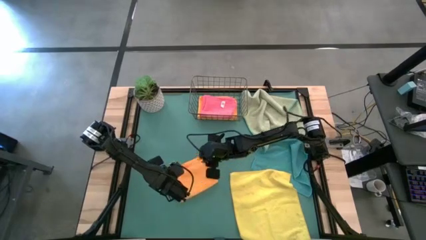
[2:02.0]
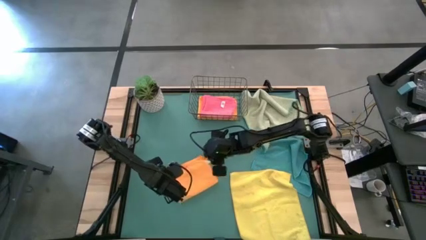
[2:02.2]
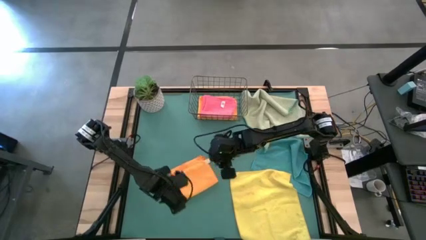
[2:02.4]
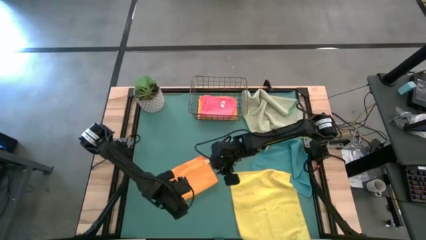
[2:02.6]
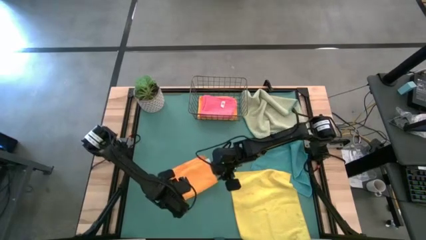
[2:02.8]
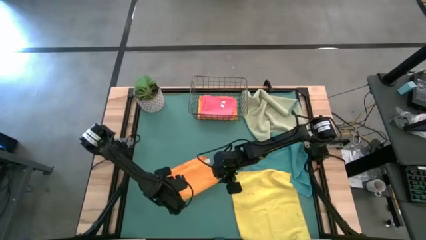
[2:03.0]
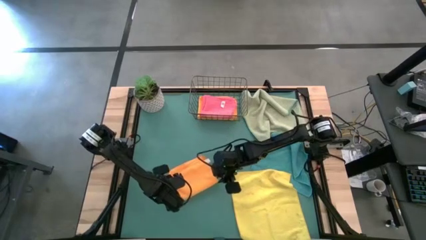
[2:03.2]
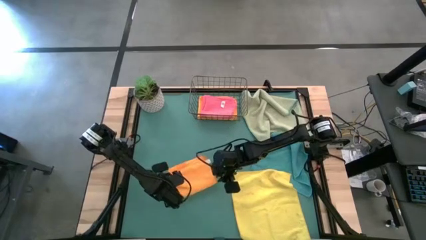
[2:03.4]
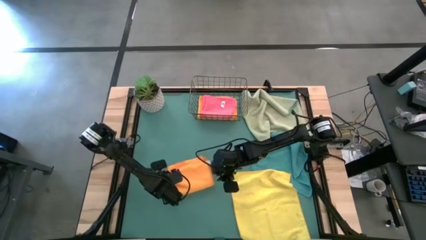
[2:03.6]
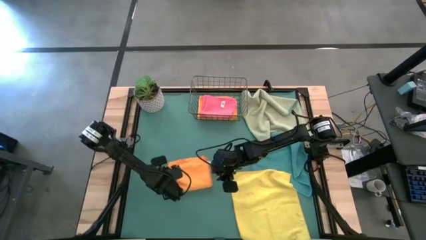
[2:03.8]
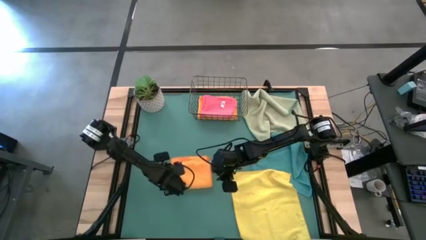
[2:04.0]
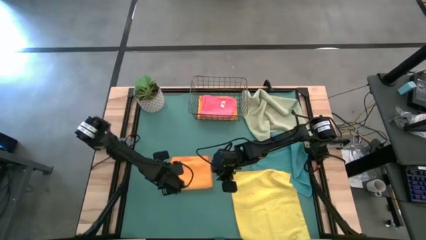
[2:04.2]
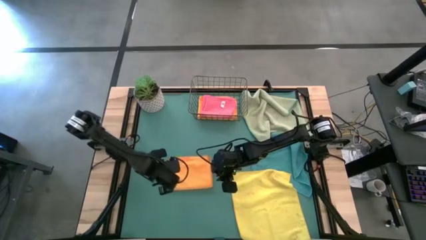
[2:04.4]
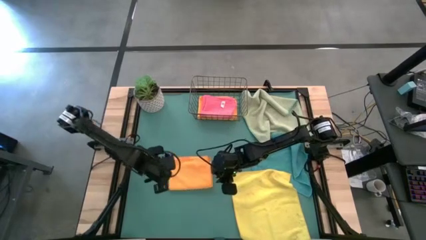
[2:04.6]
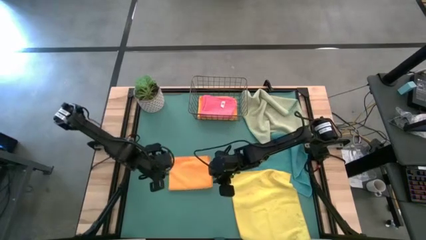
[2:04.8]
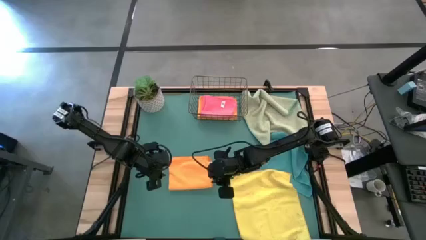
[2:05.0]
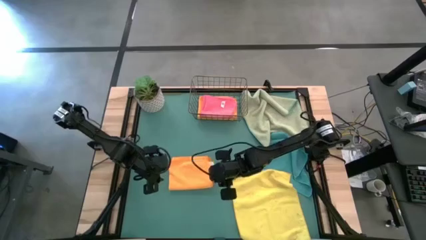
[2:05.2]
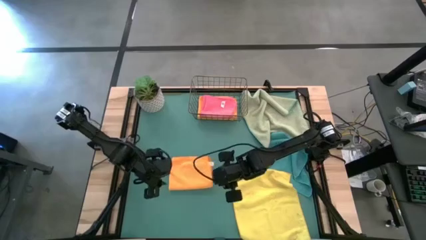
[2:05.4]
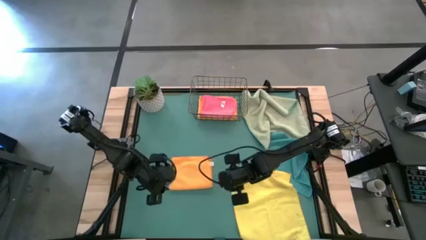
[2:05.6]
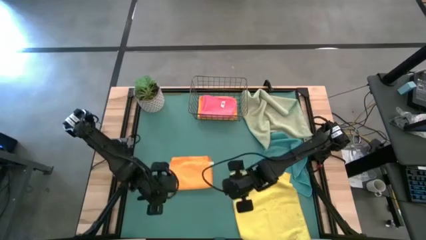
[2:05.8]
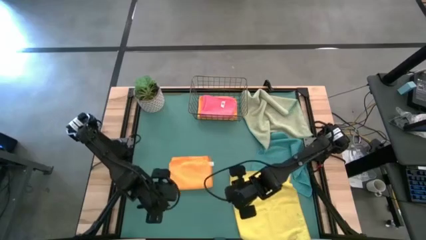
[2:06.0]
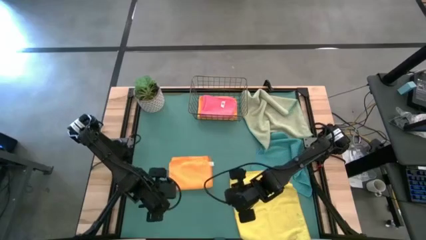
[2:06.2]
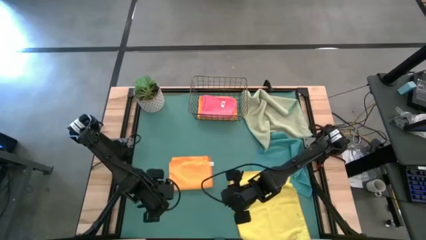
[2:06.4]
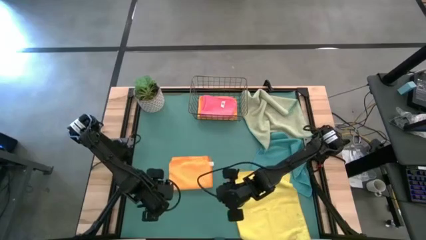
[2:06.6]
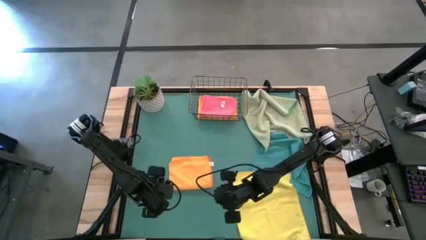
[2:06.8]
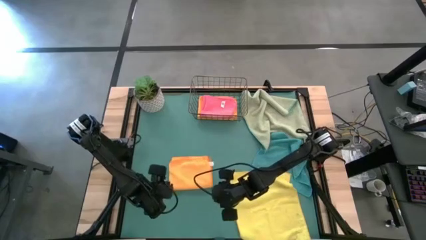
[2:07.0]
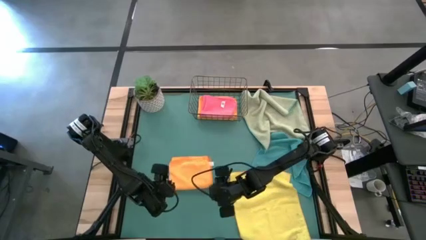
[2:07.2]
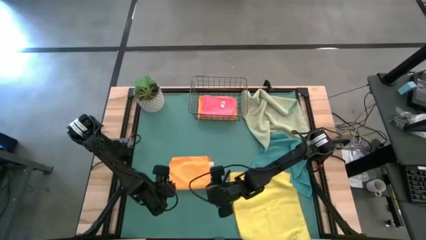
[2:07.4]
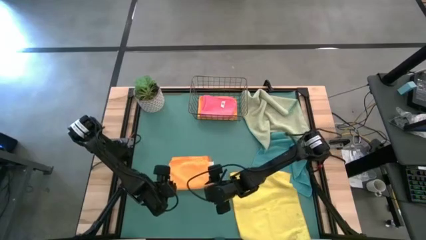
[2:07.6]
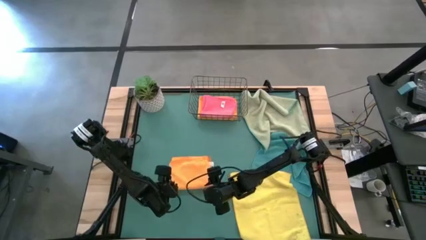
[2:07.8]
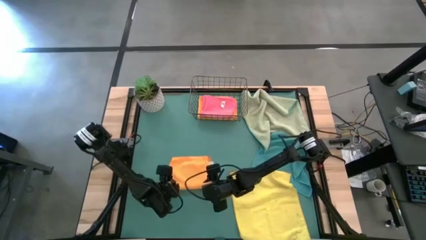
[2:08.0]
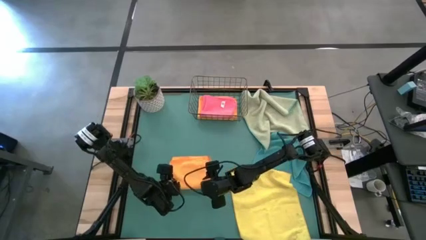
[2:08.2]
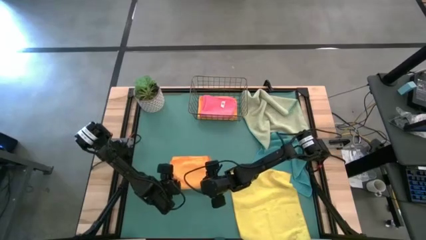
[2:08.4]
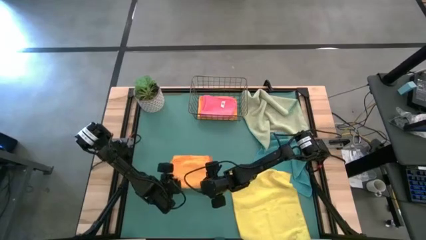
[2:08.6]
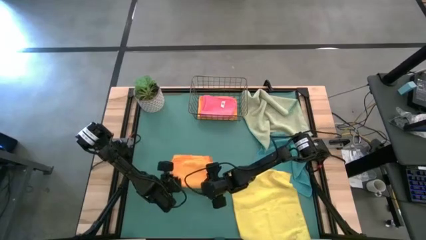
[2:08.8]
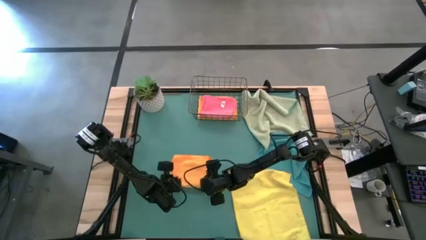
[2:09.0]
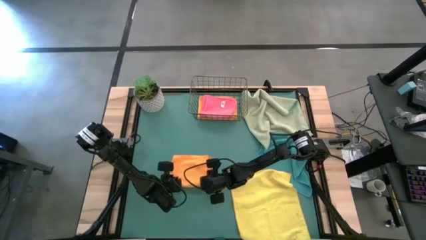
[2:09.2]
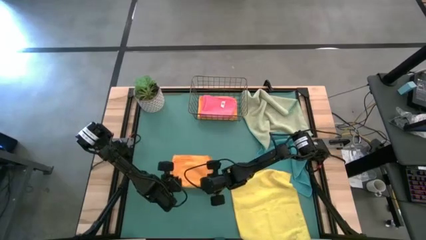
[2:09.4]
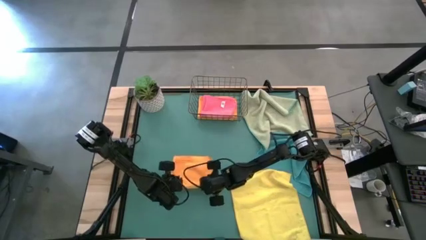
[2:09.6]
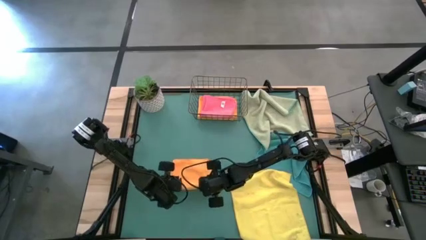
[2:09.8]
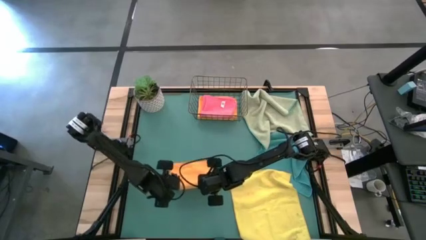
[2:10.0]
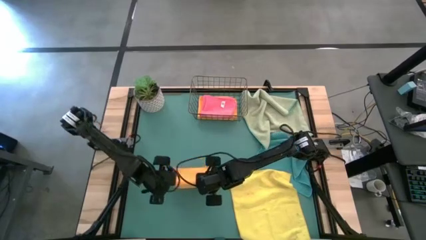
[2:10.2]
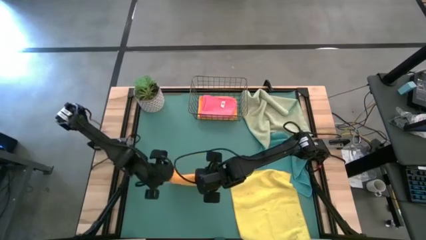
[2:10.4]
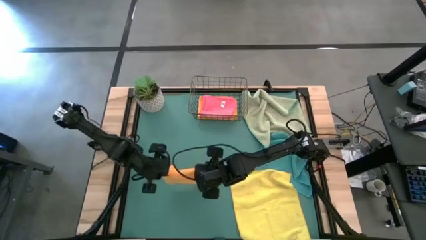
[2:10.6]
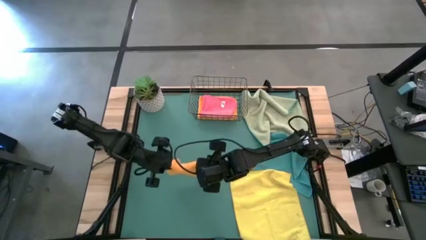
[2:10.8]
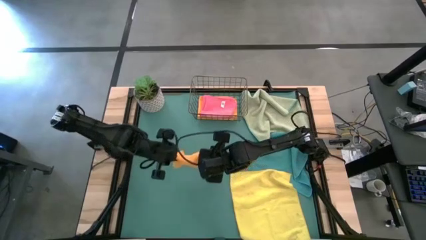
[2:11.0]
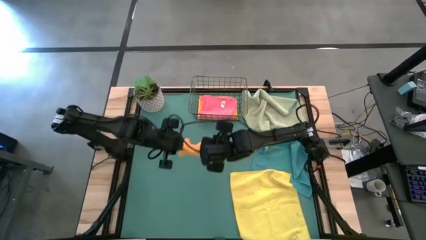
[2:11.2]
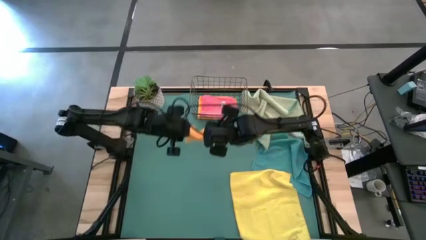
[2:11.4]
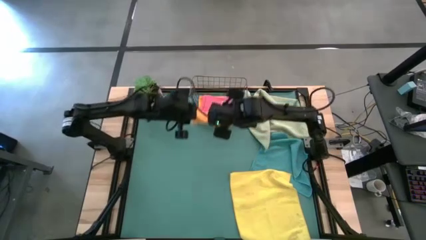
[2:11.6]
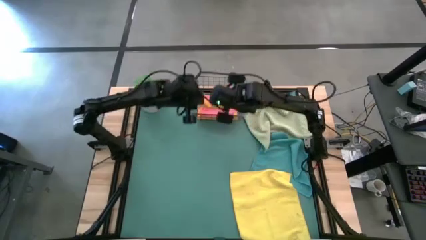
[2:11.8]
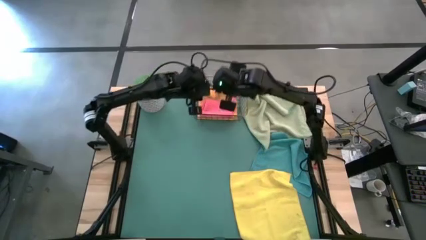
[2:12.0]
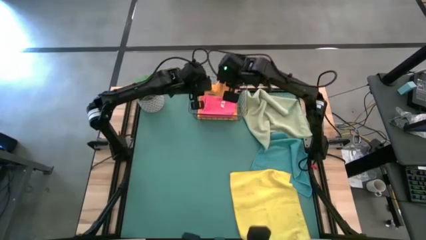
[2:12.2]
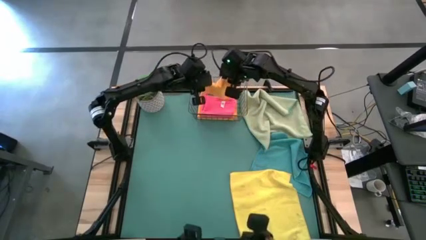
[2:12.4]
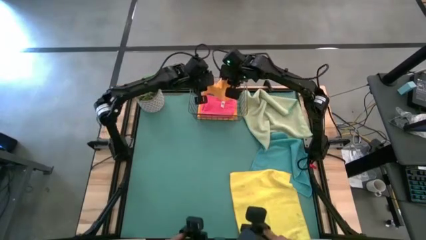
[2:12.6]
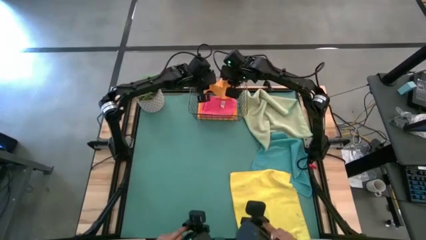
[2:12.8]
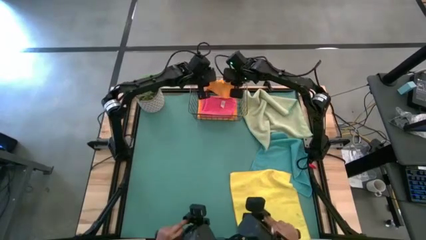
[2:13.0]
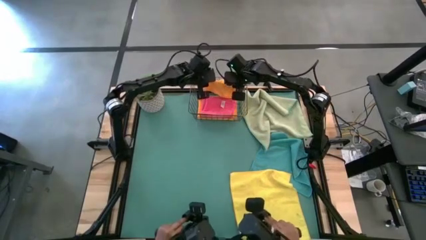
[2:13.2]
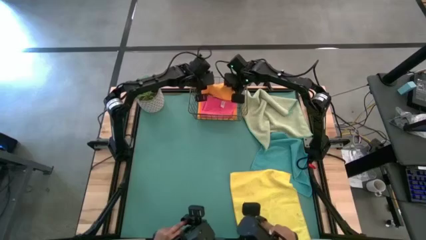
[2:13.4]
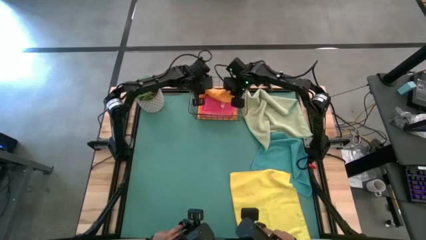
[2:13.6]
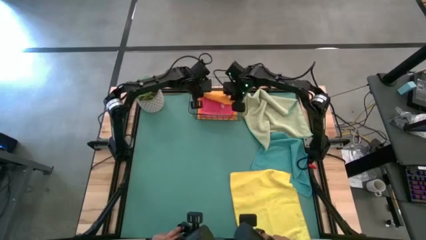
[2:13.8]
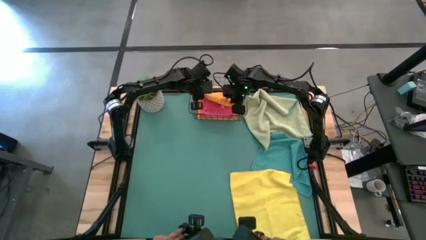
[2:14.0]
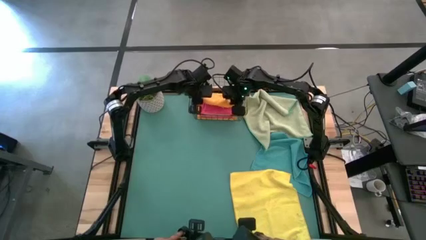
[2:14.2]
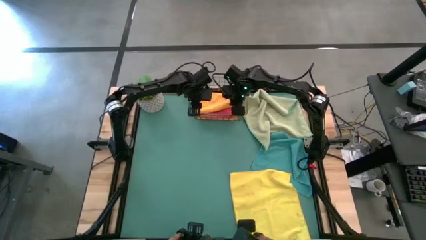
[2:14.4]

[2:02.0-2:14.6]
Task: Fold microfiber towels
Put the folded orange microfiber towel into the wire basket

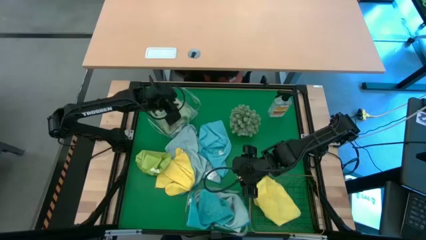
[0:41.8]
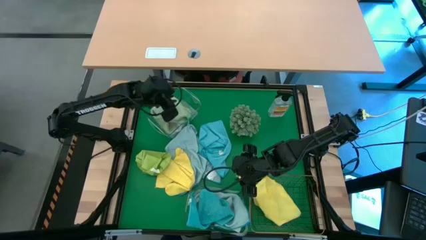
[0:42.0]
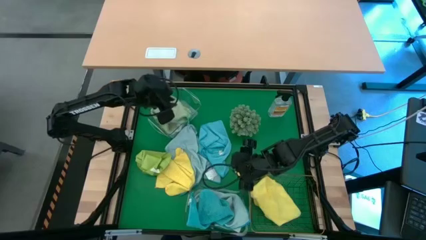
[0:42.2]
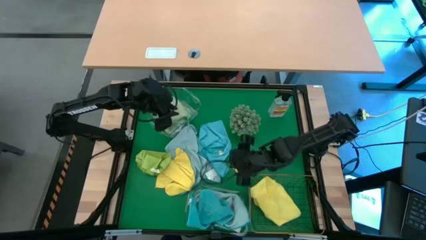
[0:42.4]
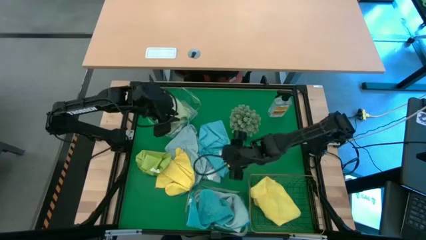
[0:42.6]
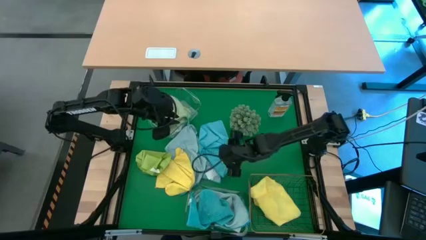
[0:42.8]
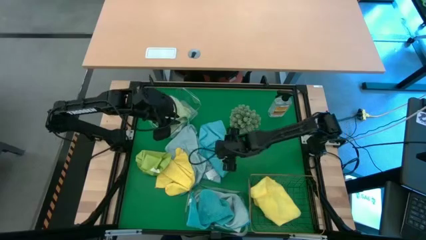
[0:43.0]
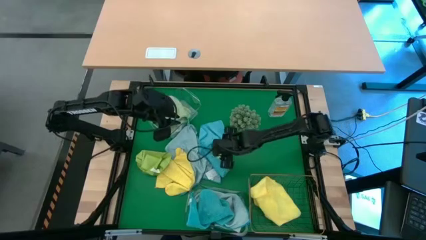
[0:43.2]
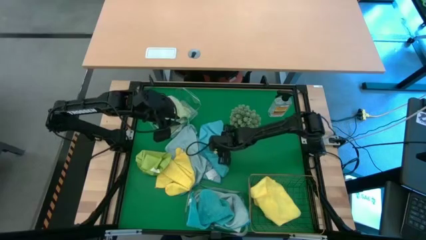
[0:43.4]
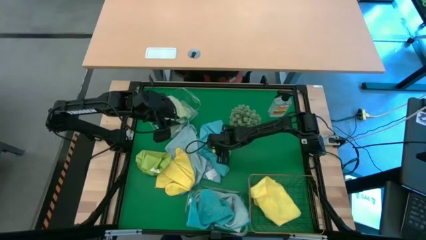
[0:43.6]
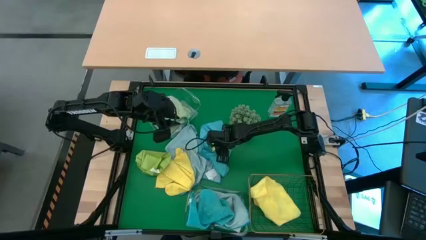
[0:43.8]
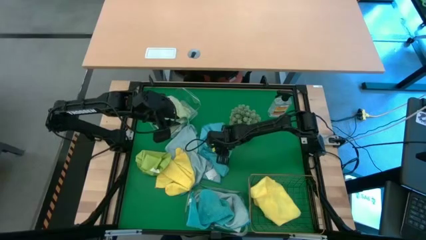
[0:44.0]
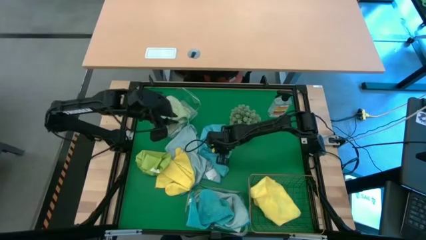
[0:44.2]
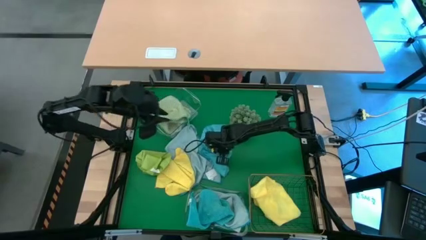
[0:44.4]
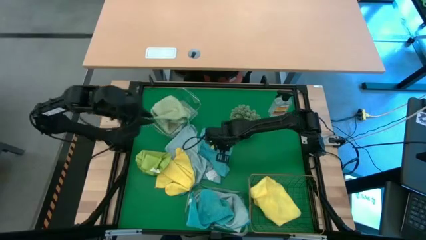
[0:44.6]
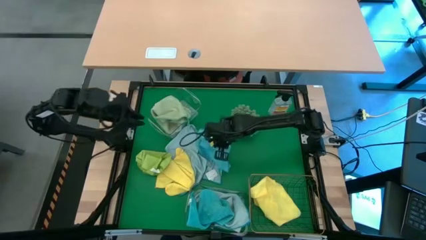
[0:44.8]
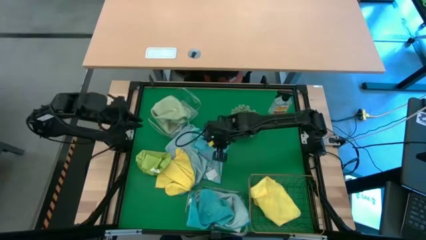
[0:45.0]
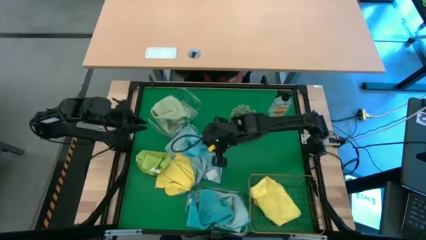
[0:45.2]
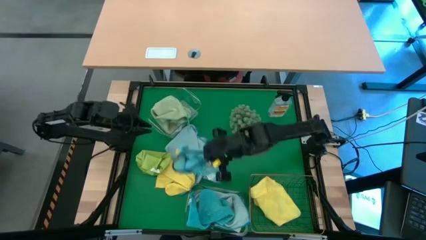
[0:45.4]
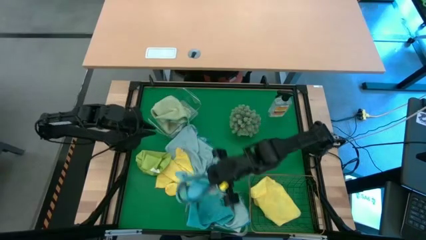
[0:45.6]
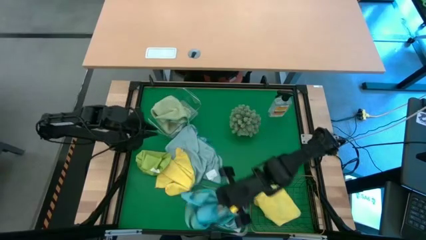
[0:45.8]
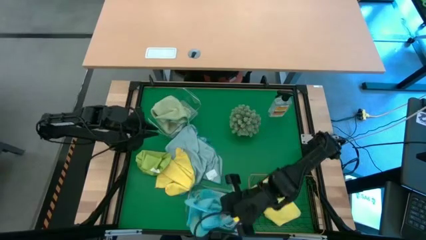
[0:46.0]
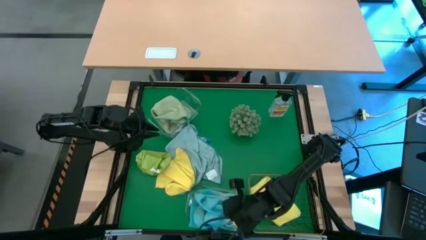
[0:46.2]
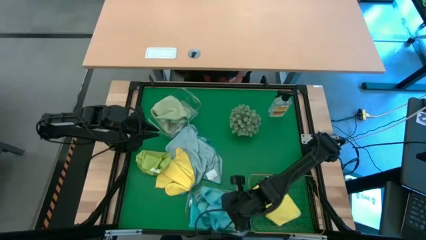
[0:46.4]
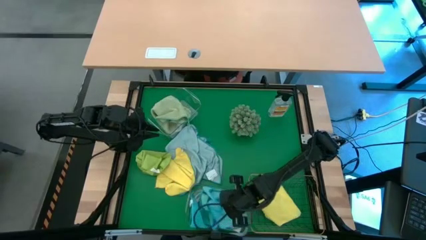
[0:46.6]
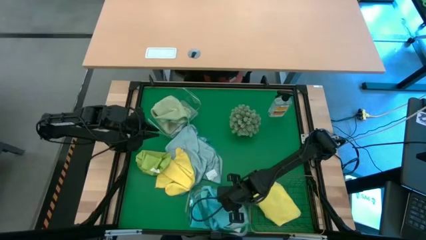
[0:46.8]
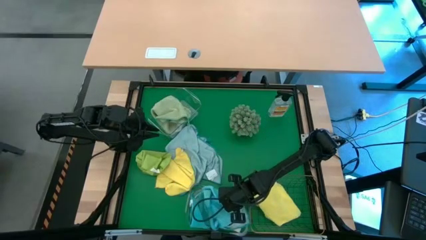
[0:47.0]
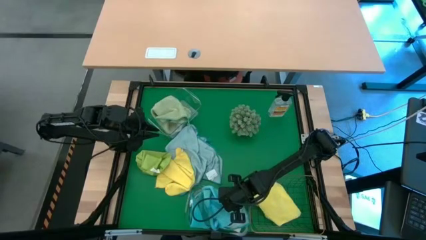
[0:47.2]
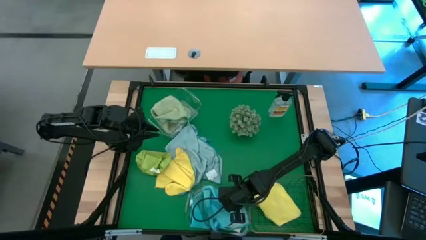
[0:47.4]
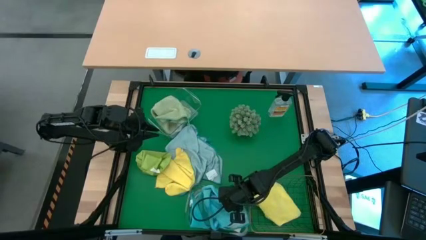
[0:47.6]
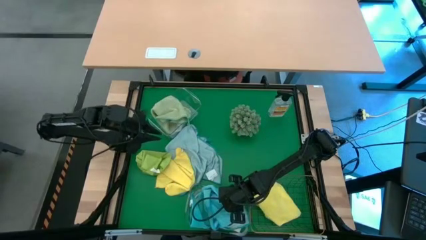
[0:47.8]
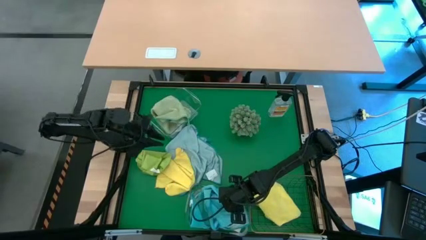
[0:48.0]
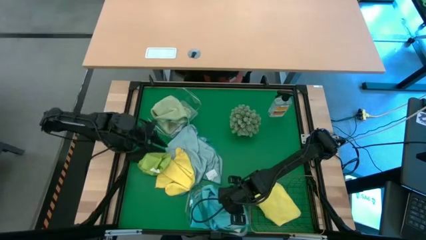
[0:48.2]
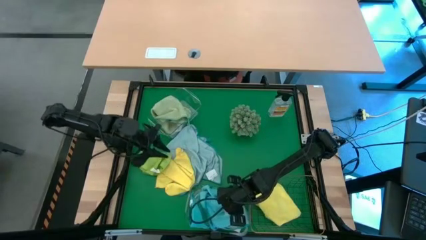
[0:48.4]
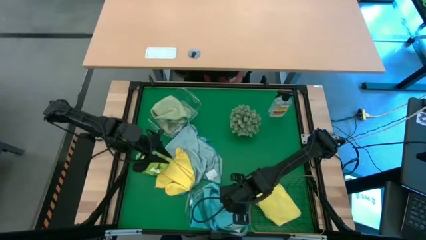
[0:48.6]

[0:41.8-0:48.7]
Task: Sort microfiber towel by color & place in baskets
Put the blue microfiber cloth into the bottom transparent bin
